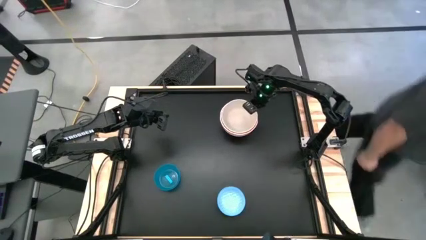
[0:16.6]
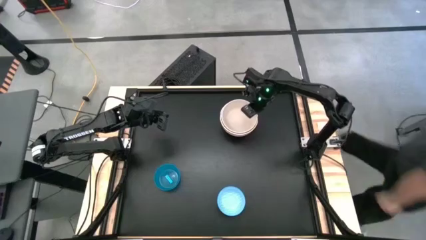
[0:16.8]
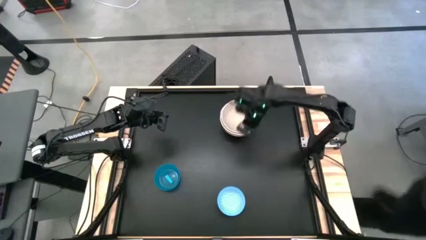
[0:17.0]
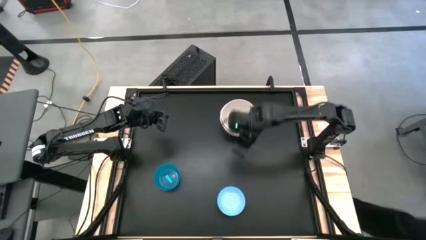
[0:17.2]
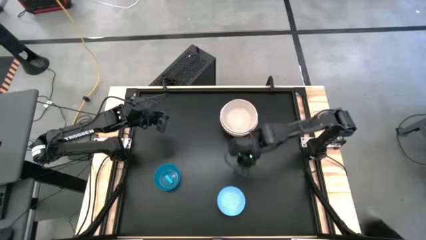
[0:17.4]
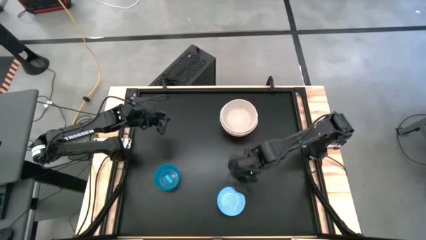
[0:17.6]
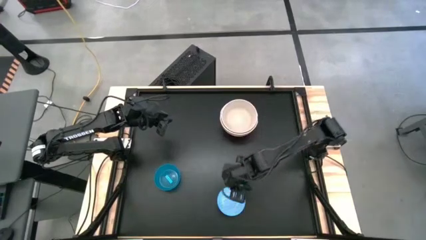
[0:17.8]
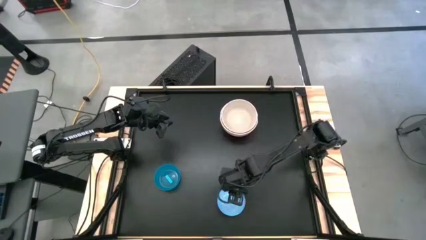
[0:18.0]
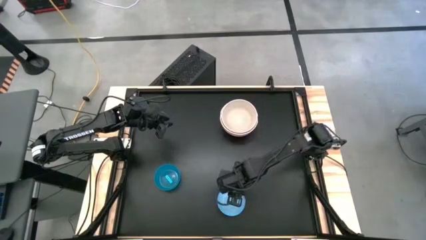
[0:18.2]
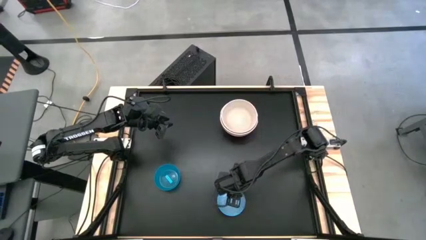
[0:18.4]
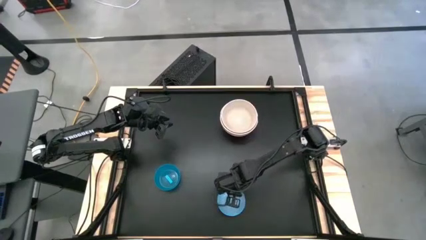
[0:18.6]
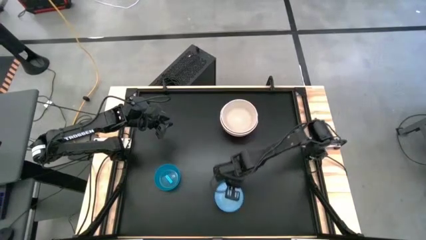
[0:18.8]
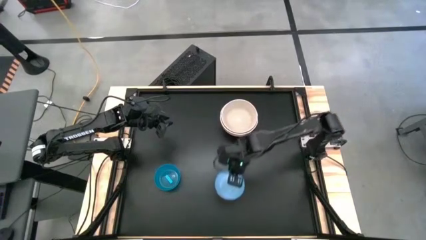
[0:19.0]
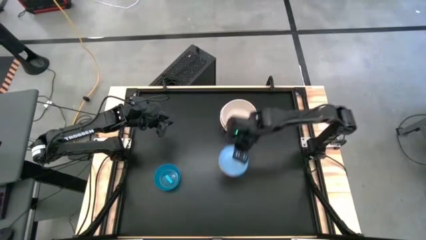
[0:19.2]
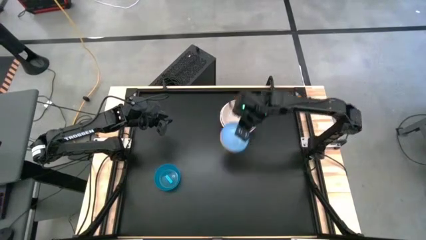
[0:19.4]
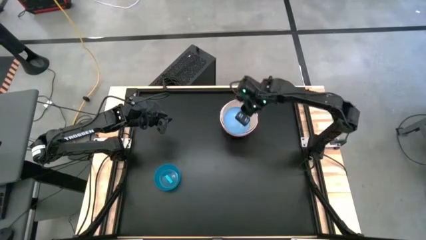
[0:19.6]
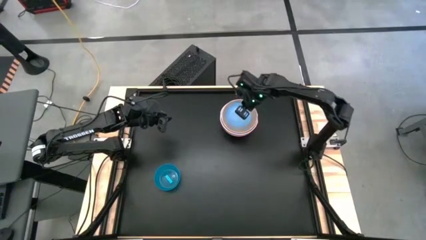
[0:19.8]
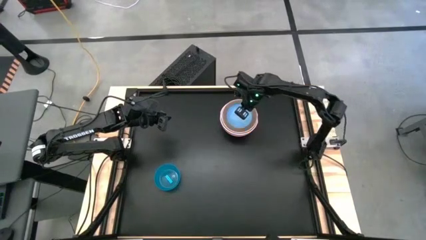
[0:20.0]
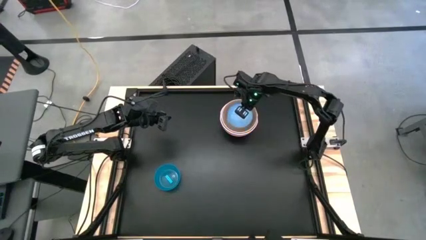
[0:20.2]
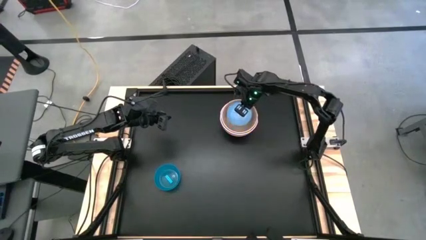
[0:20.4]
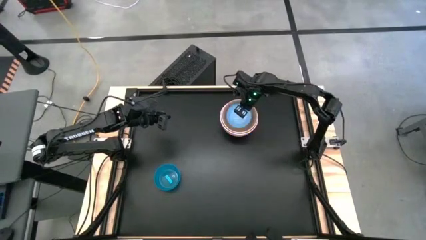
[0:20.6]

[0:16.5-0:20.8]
Stack the blue patterned bowl on the gray bowl

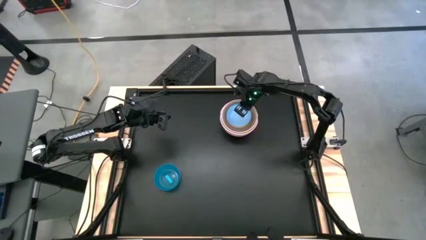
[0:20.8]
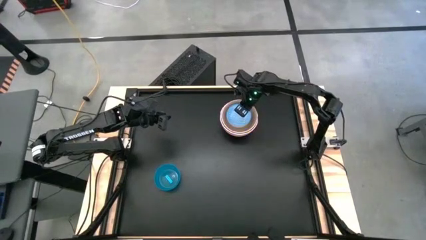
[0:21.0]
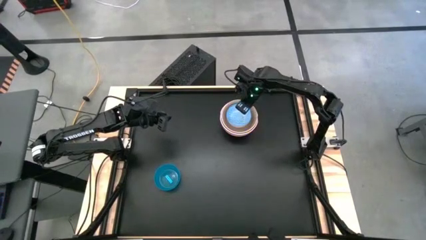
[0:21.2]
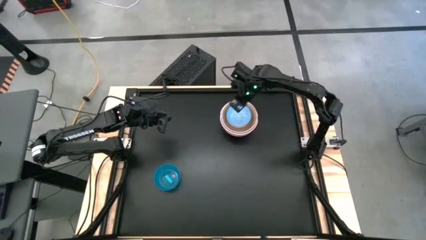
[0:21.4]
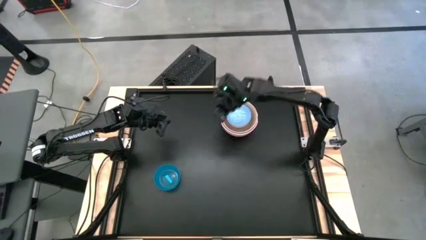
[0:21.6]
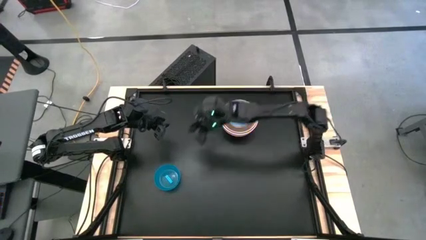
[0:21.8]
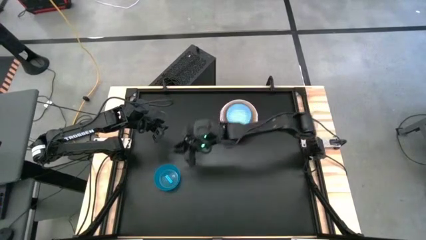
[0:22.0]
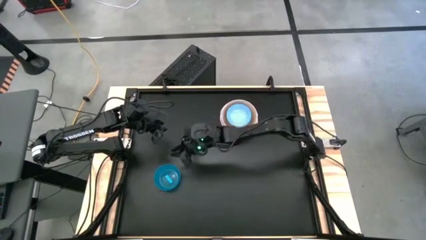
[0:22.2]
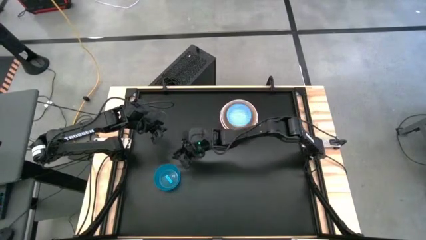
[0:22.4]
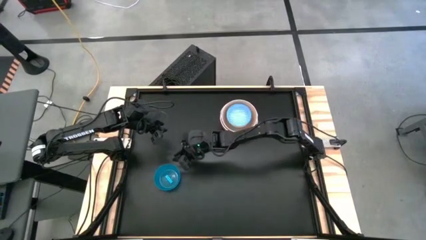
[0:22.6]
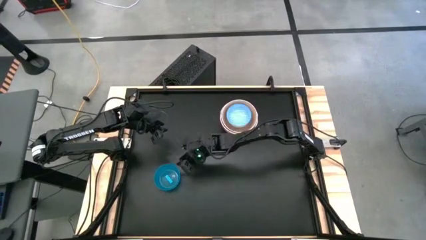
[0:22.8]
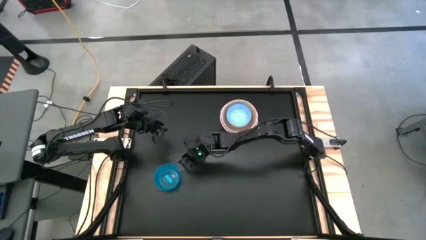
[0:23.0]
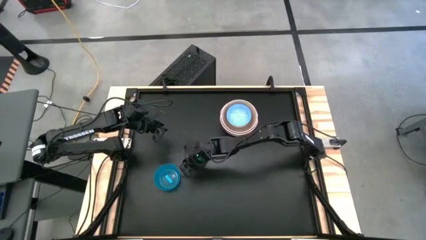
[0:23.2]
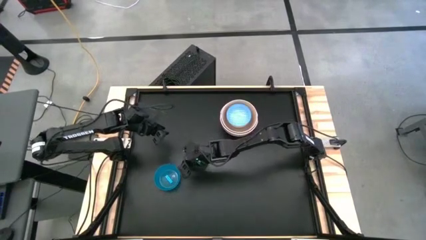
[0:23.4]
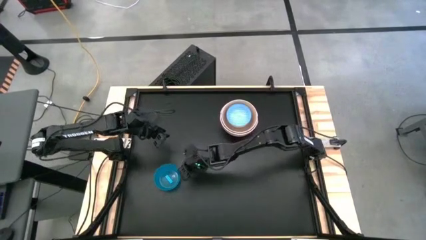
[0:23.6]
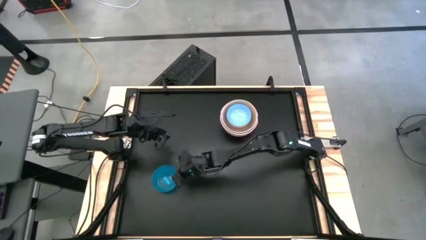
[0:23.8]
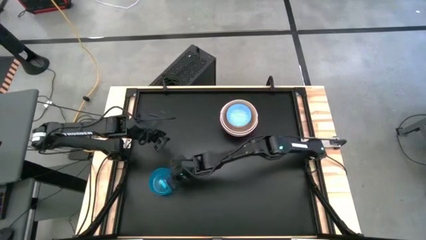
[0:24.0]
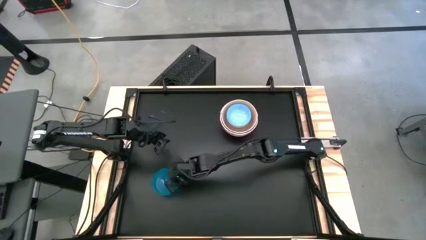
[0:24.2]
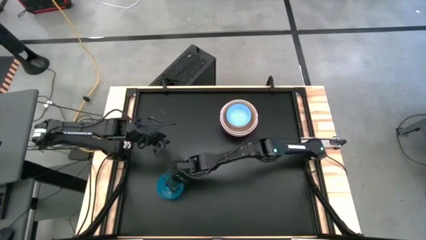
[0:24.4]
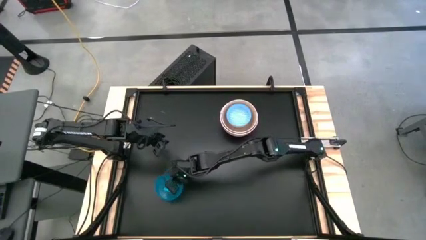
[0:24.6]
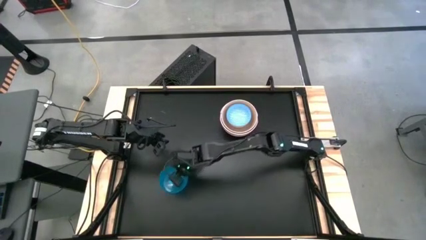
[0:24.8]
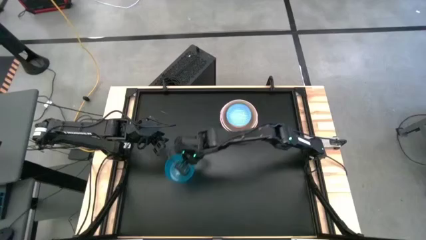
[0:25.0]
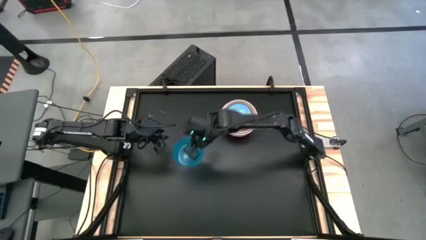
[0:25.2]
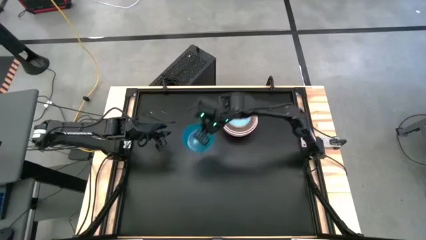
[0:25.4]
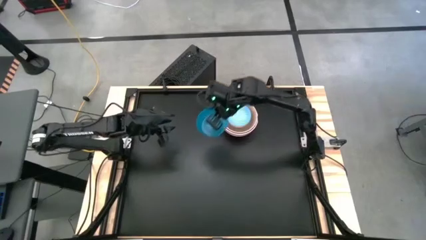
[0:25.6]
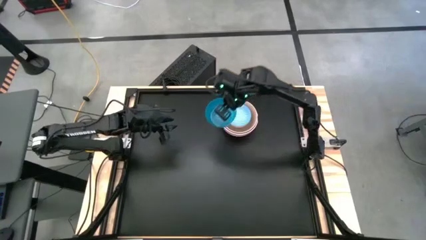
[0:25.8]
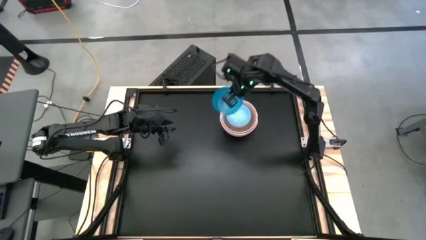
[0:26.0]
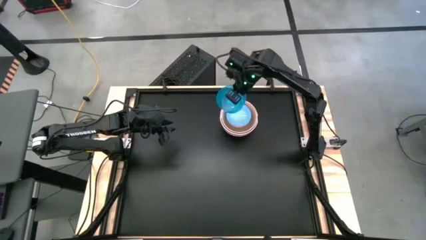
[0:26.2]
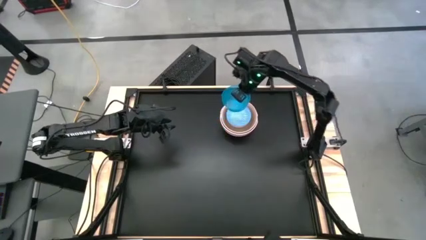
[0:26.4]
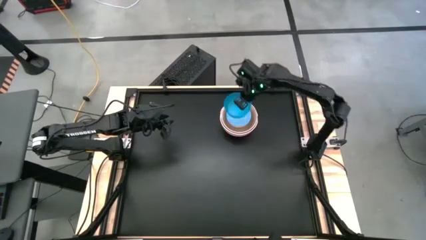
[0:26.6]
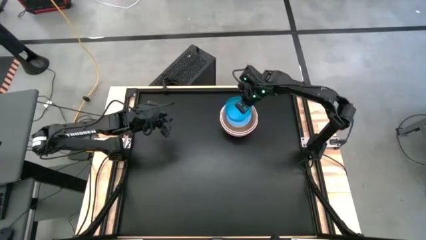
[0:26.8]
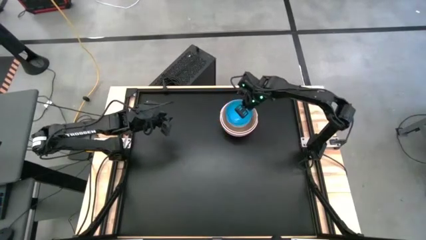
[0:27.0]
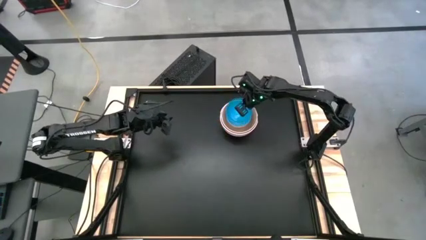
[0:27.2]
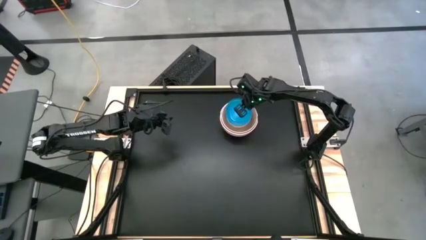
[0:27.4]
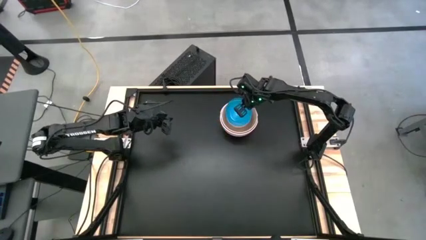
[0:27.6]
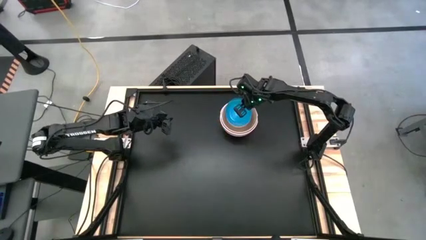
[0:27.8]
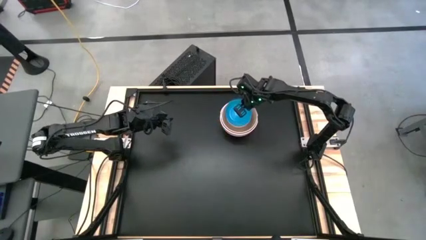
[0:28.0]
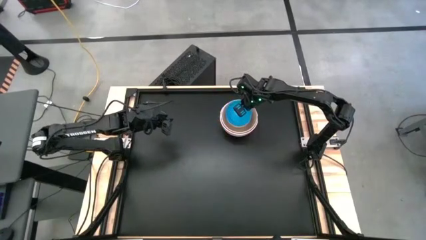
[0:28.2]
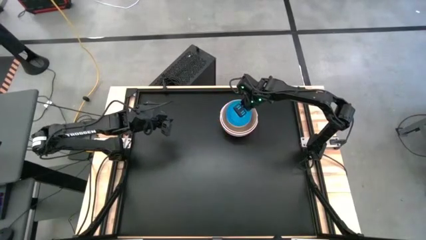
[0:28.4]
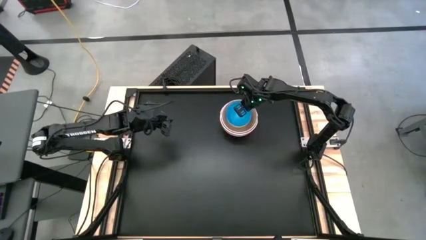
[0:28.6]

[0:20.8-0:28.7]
Stack the blue bowl on the blue patterned bowl

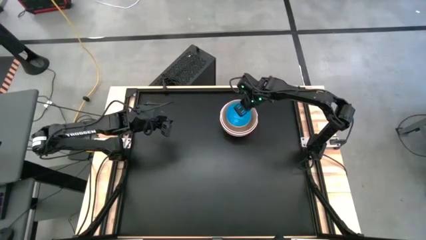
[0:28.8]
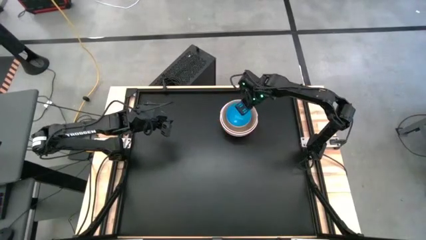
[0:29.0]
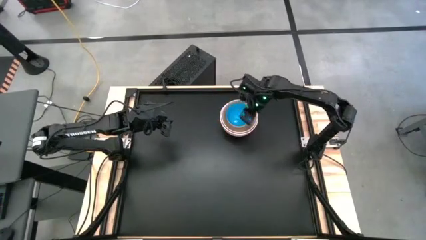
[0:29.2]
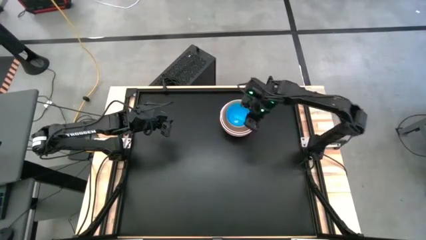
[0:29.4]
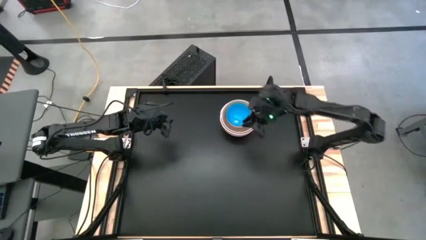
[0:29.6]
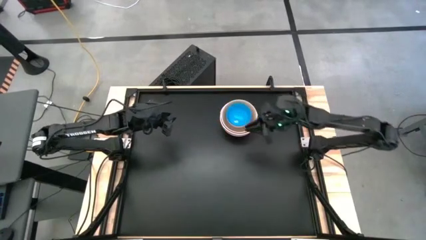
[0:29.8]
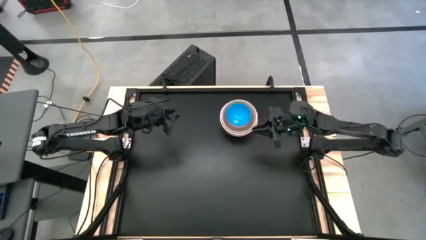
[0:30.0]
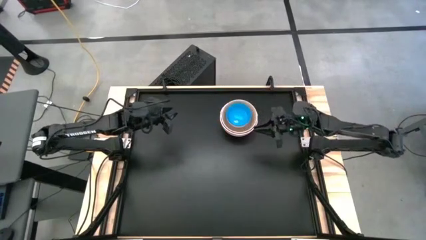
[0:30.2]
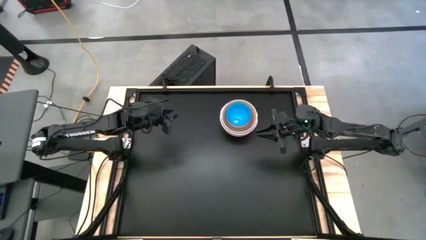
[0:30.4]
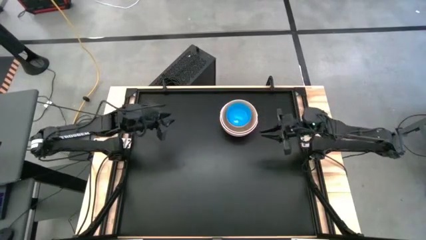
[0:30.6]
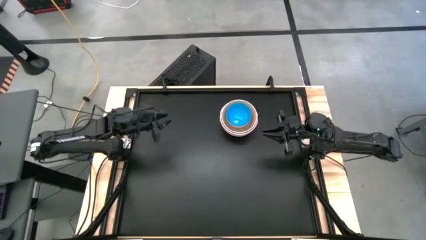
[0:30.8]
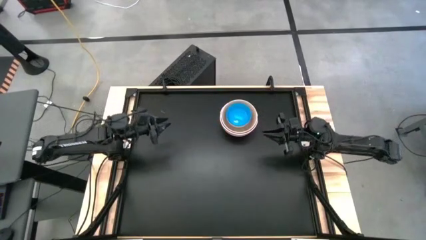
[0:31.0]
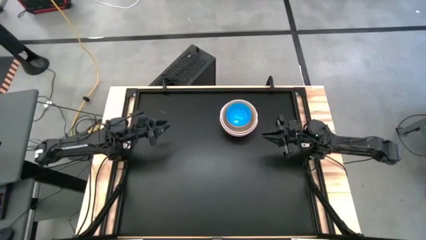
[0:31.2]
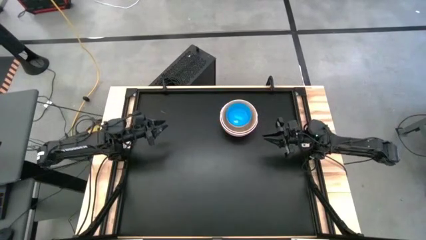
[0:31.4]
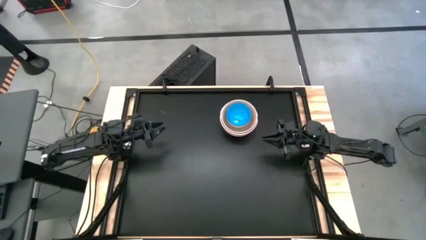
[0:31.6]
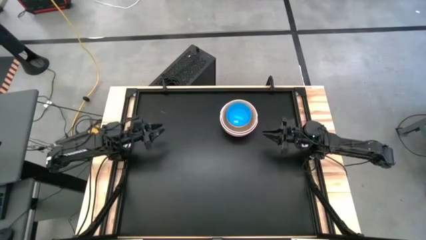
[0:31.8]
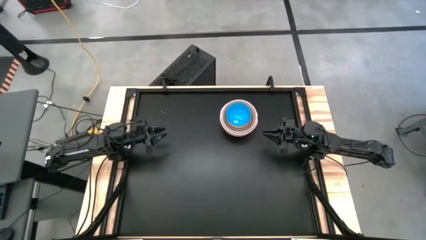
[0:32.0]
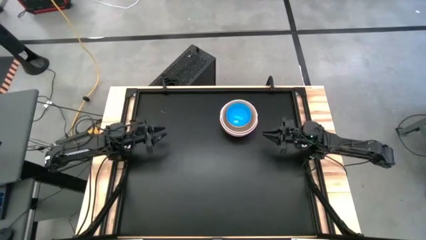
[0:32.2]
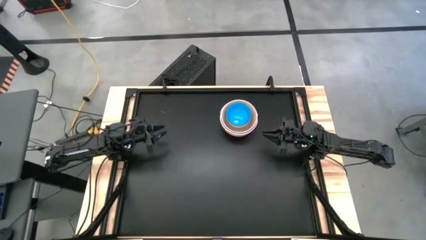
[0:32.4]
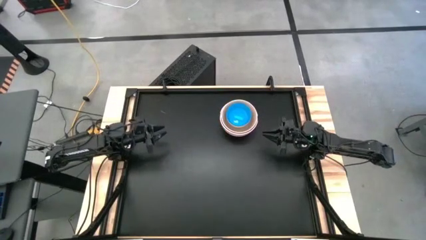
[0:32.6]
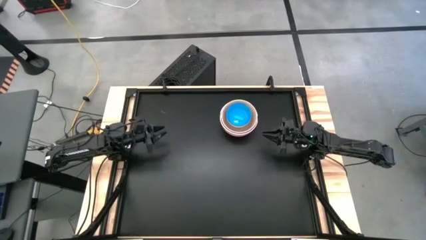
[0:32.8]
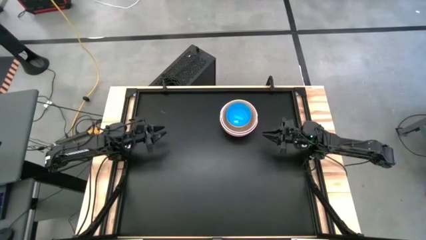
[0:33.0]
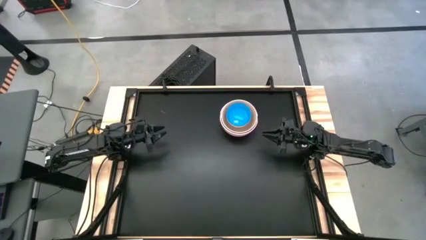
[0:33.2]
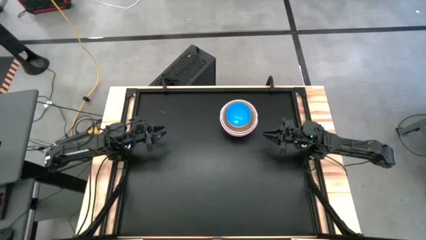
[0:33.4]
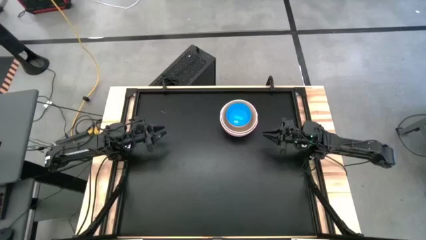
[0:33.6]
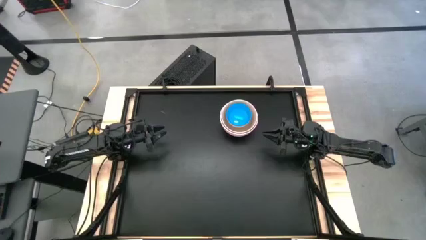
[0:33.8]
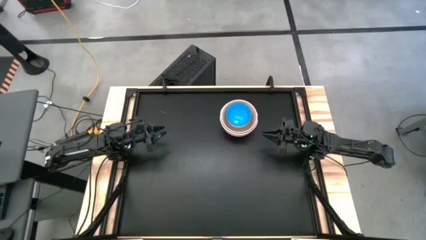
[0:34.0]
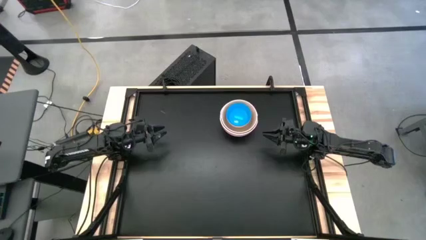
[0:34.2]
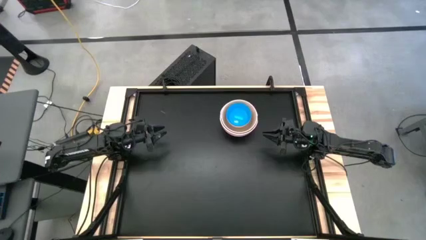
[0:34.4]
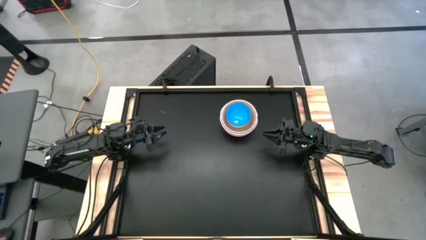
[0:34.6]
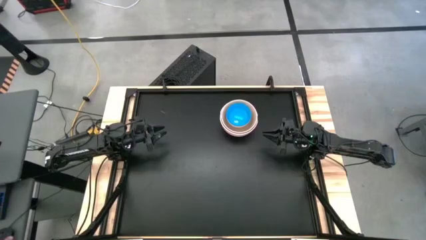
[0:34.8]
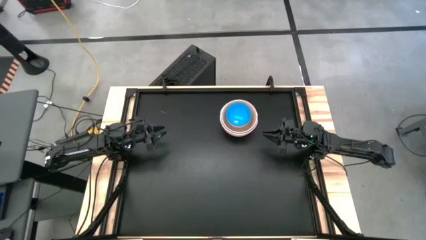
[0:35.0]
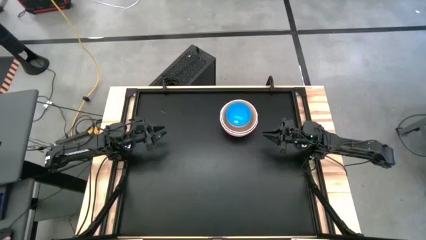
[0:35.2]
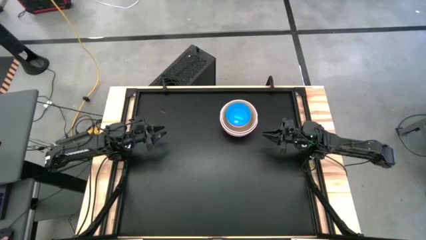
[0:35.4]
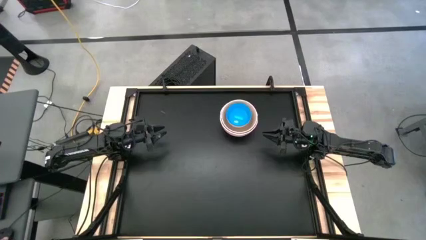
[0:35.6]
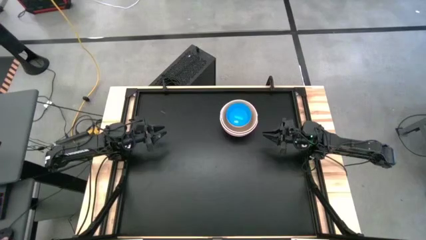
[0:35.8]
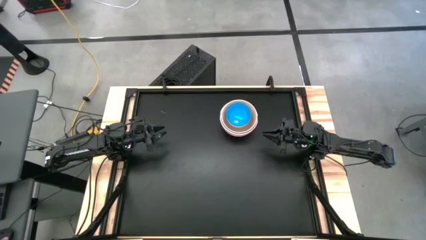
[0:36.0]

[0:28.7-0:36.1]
Return to Home Position
